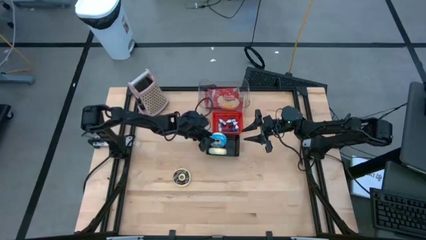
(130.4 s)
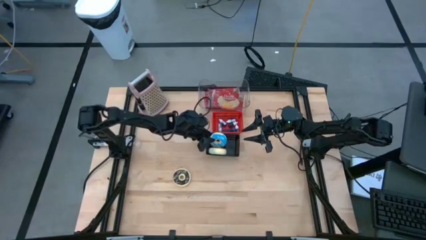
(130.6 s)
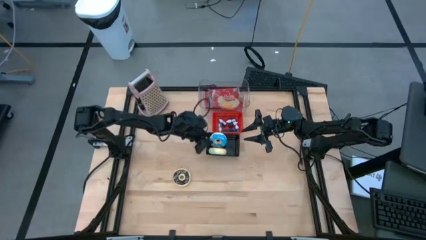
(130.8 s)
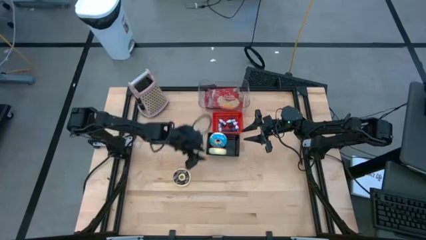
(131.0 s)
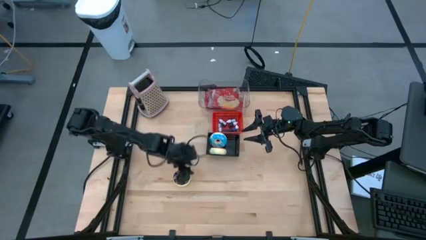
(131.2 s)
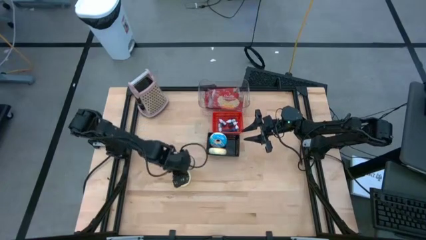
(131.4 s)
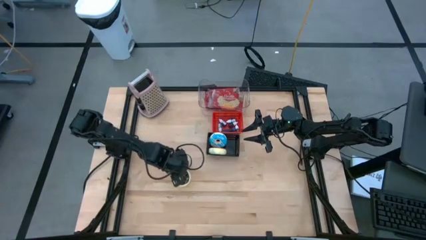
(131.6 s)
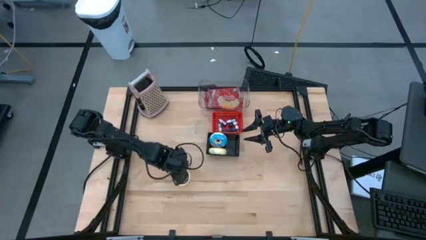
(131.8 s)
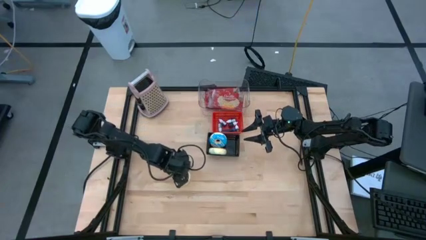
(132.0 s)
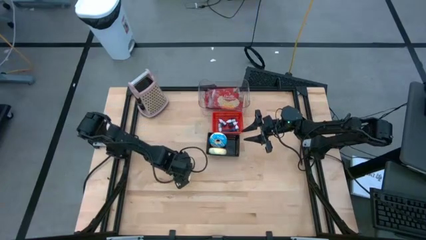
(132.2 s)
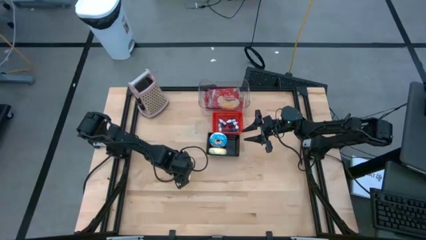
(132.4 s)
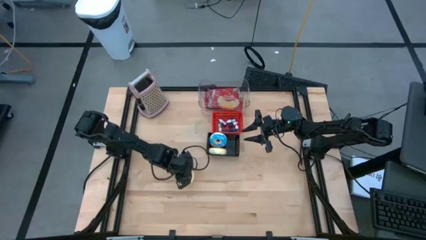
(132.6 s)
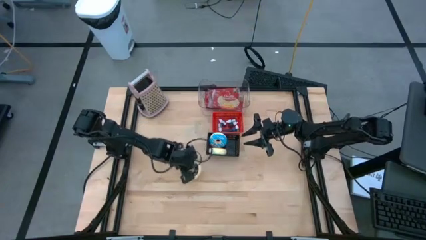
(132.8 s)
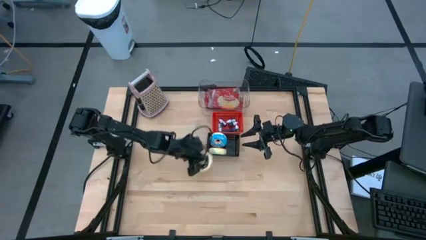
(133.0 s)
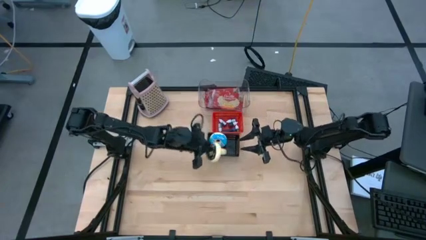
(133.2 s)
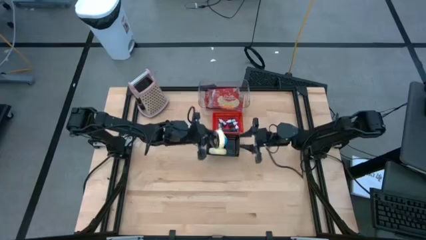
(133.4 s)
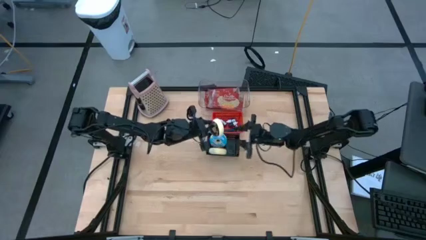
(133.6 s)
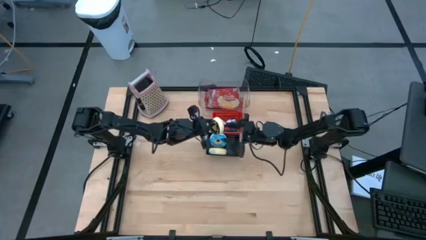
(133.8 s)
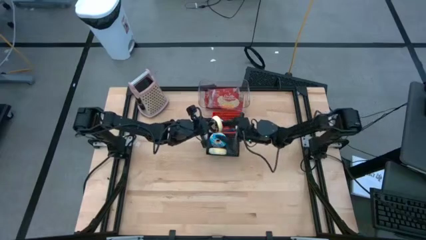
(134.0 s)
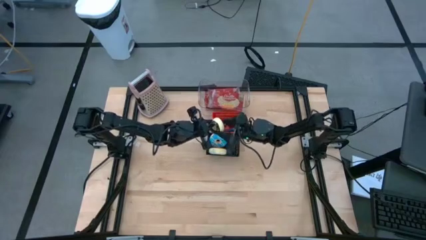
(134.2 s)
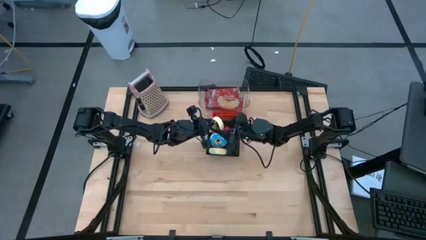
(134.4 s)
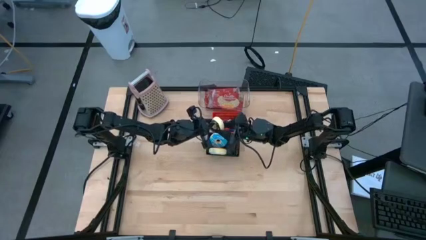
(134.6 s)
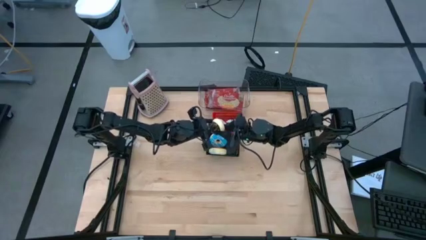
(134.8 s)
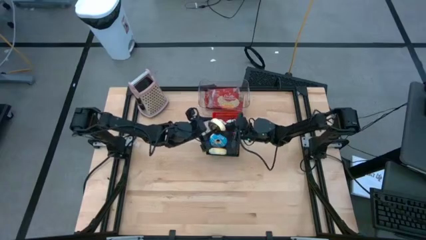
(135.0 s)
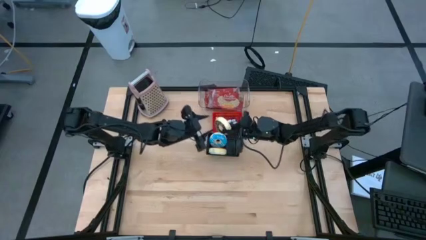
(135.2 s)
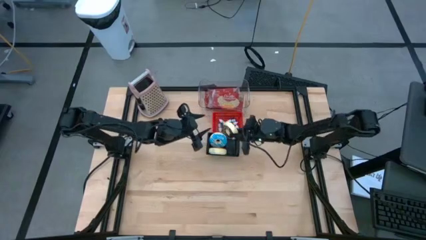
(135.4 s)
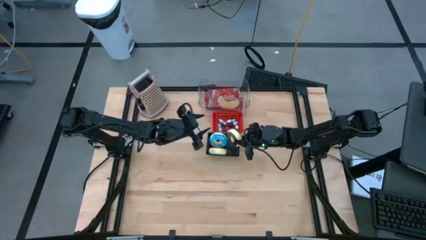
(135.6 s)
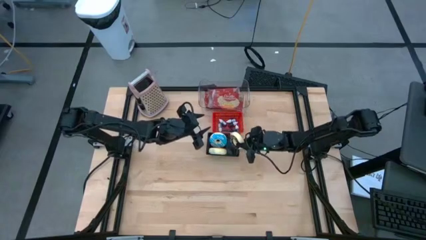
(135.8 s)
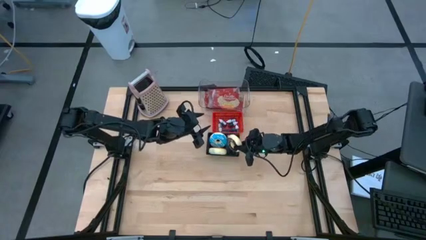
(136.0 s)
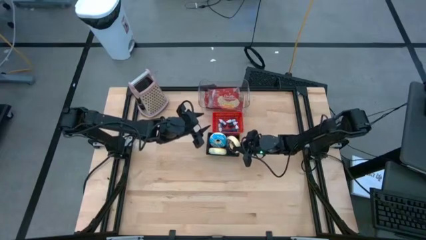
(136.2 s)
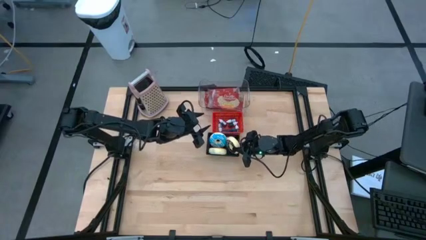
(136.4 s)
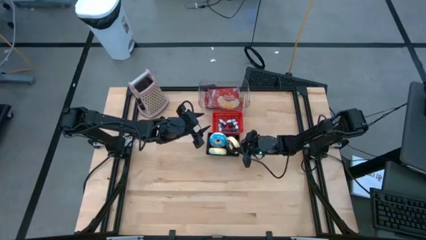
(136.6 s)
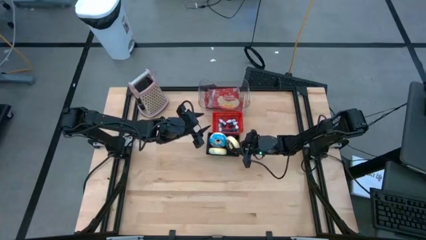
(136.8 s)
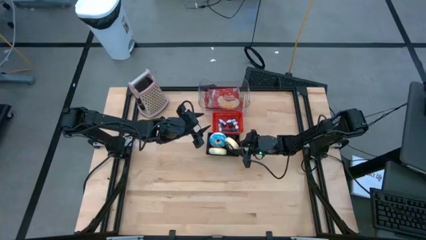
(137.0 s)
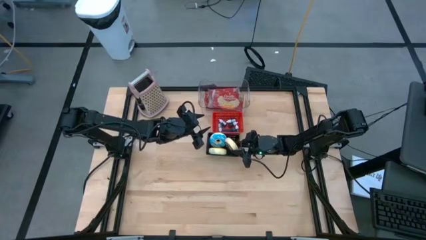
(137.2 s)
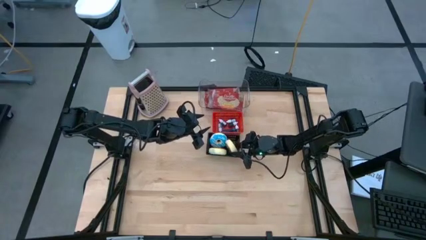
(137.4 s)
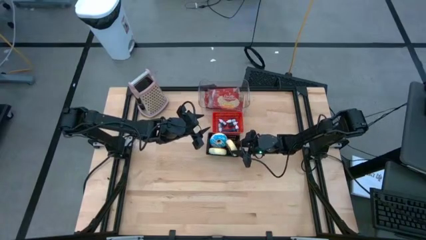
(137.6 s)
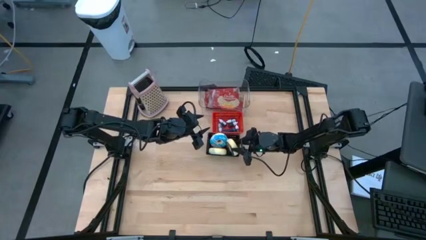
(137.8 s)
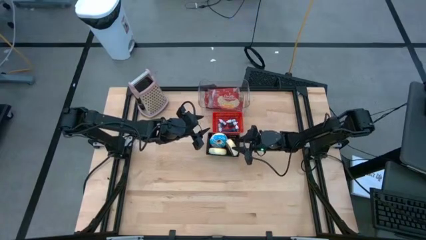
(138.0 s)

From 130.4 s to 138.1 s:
Put the black doughnut into the black bin

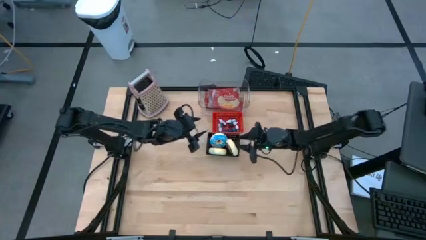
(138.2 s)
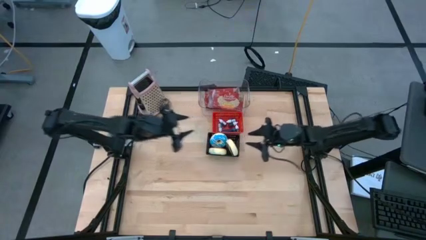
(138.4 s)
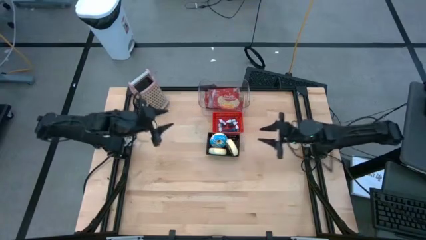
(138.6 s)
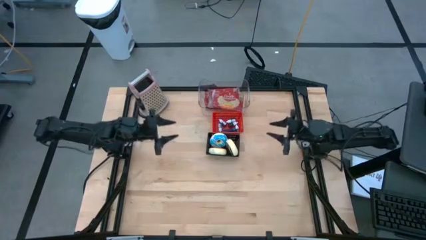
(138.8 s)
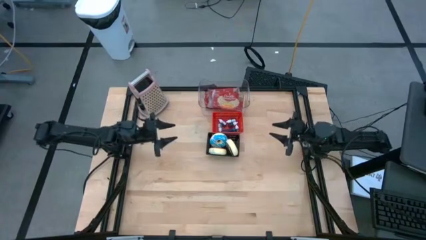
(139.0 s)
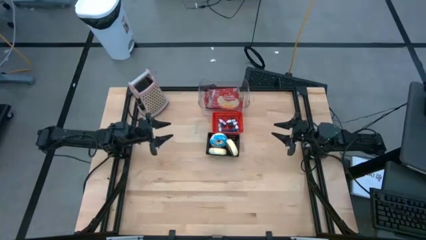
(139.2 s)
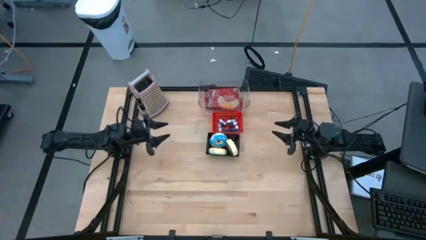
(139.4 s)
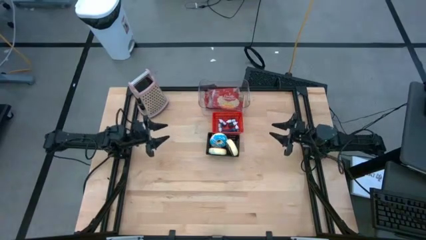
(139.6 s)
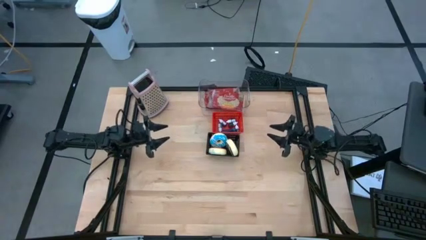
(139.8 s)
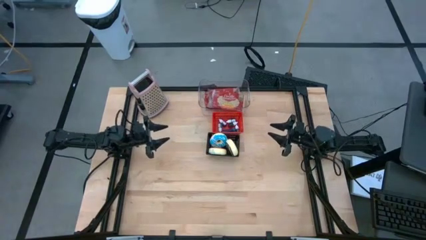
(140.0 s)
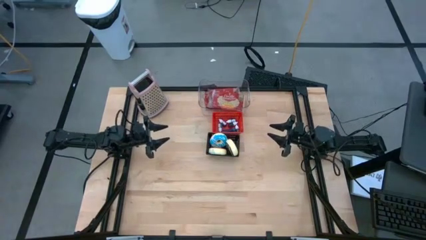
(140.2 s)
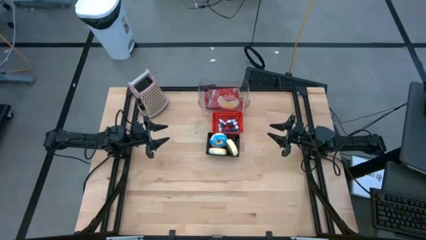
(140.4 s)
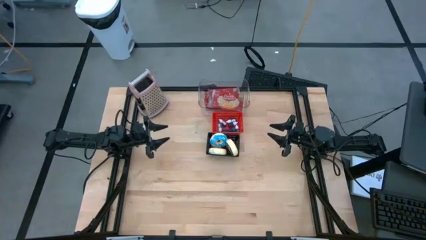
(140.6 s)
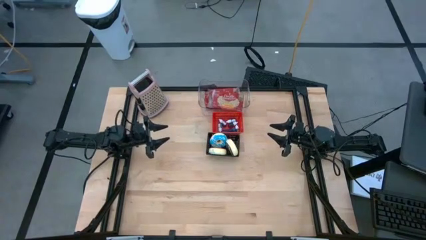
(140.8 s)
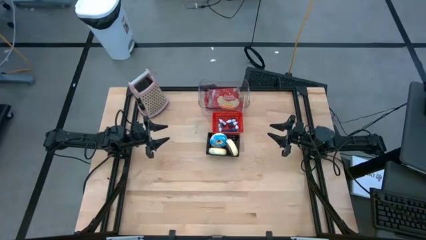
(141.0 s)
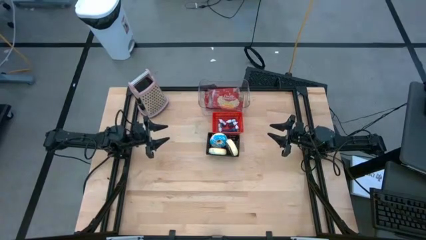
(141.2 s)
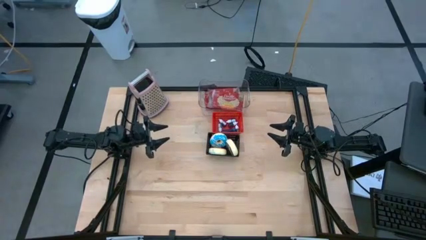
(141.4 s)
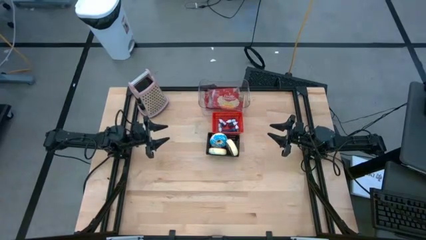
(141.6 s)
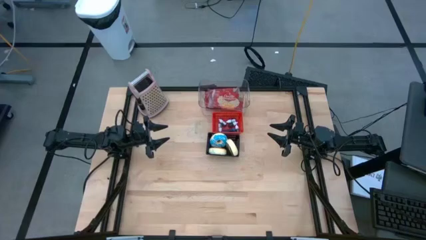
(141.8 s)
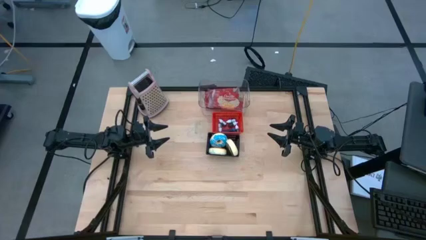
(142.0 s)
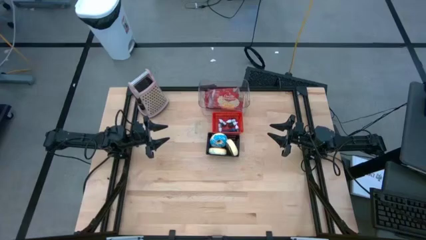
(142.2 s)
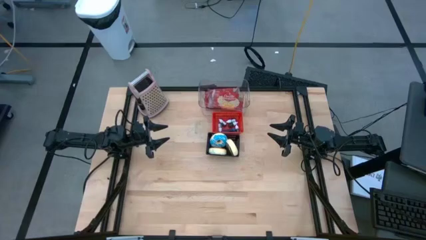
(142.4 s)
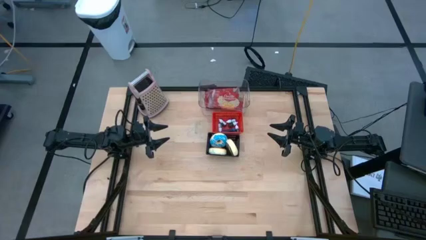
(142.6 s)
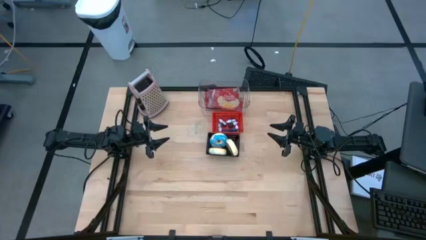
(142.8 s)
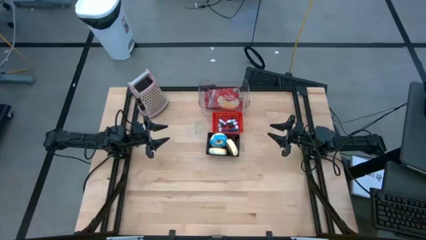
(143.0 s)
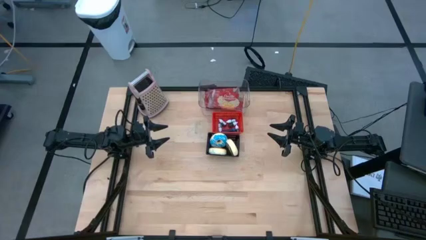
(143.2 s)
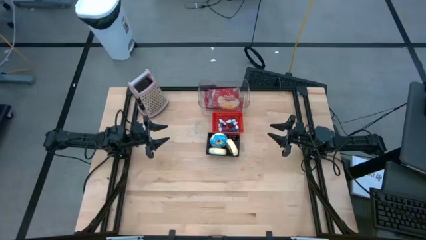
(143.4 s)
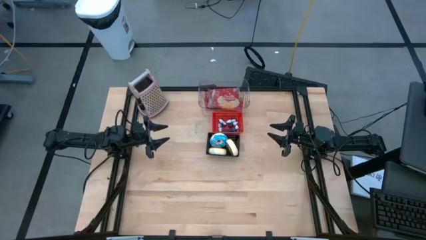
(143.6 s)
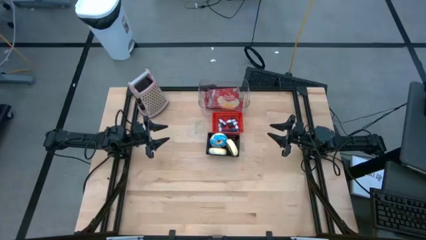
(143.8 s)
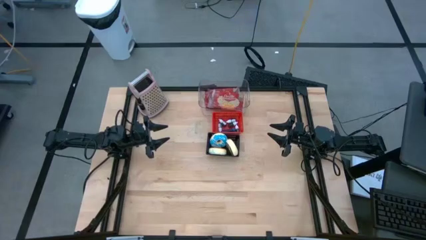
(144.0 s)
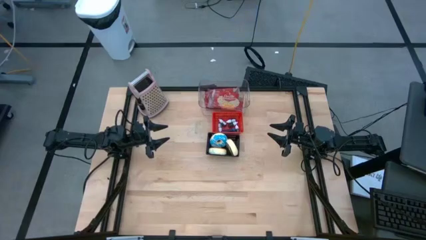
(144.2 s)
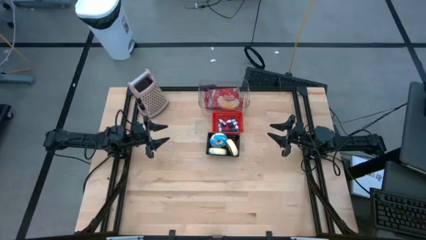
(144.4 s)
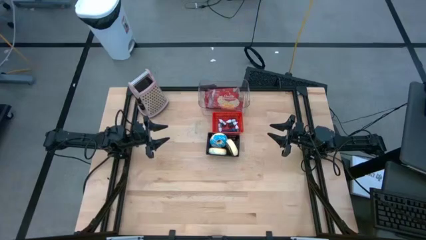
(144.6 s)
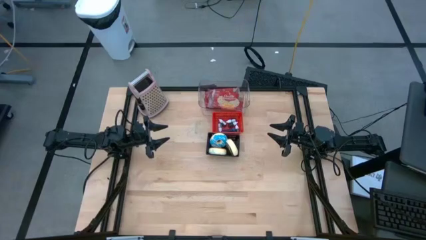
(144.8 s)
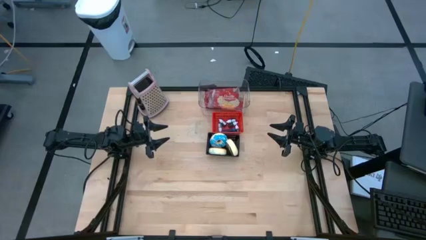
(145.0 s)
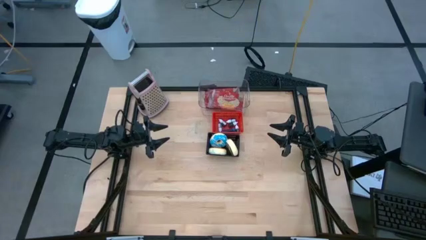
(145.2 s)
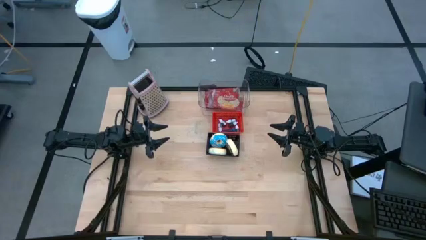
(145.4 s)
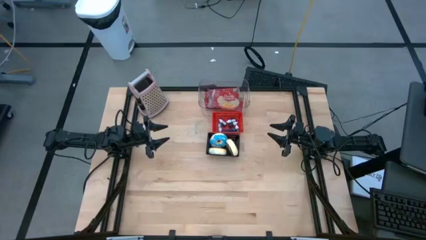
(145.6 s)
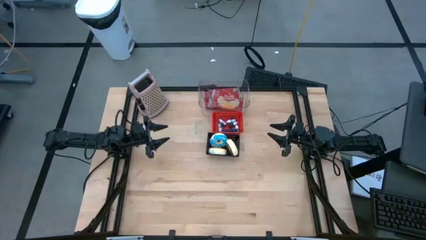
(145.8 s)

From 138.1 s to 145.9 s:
Return to Home Position
